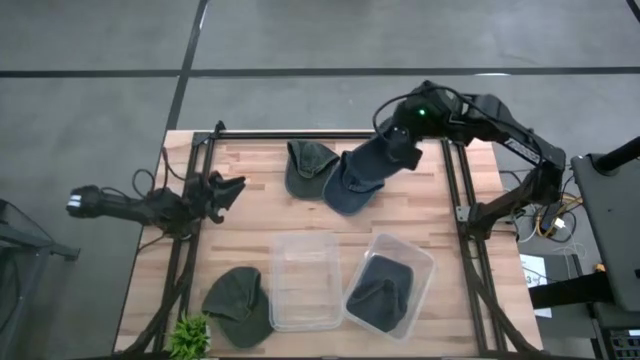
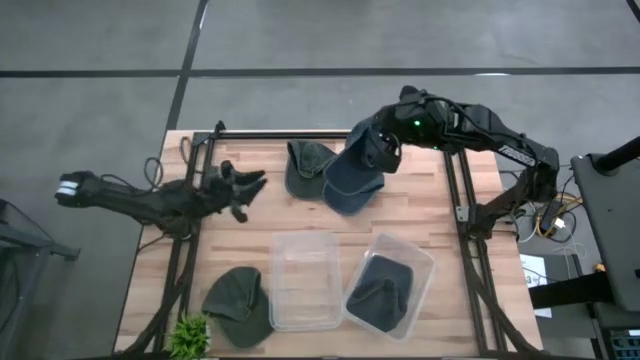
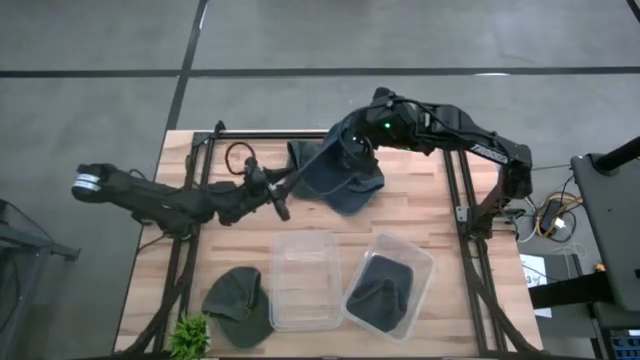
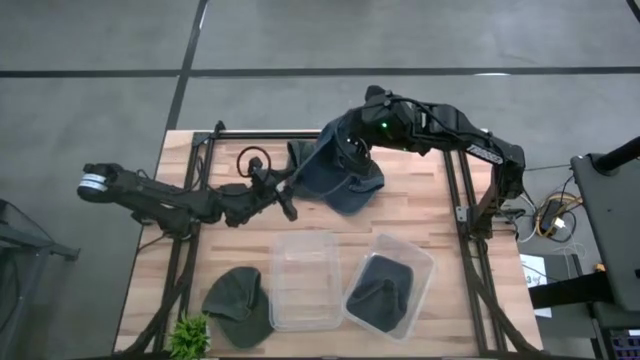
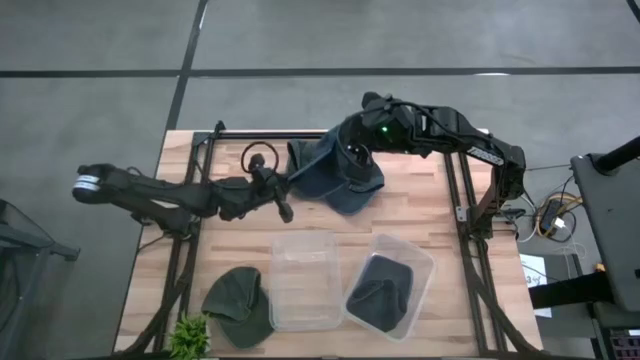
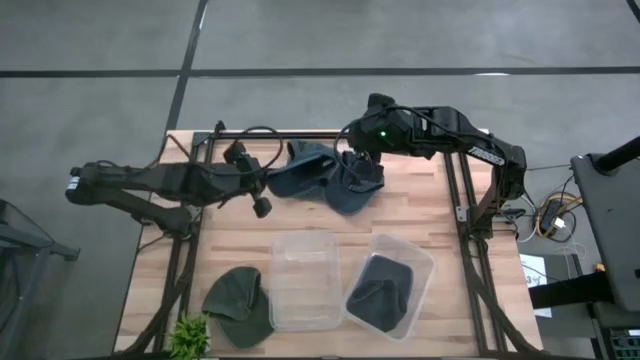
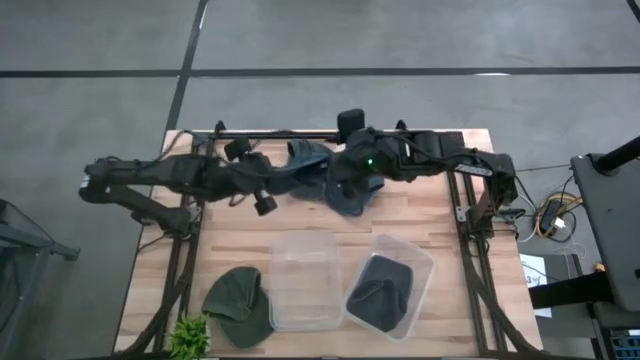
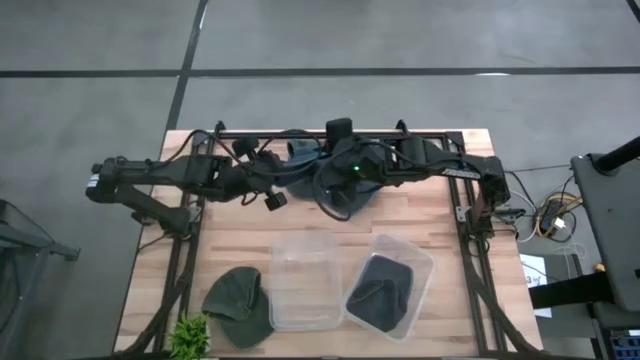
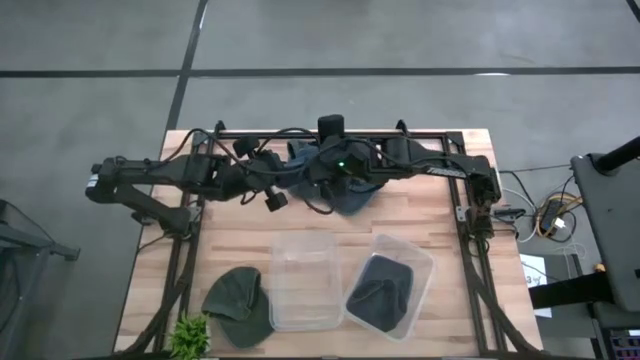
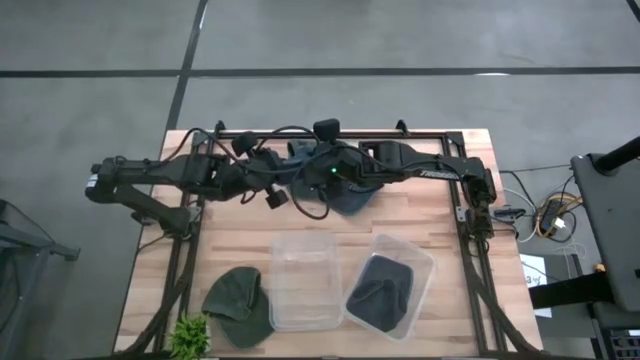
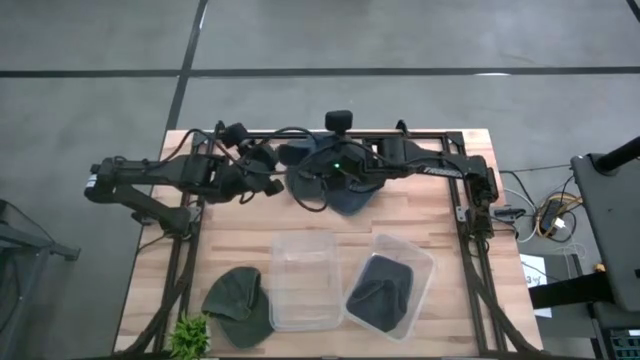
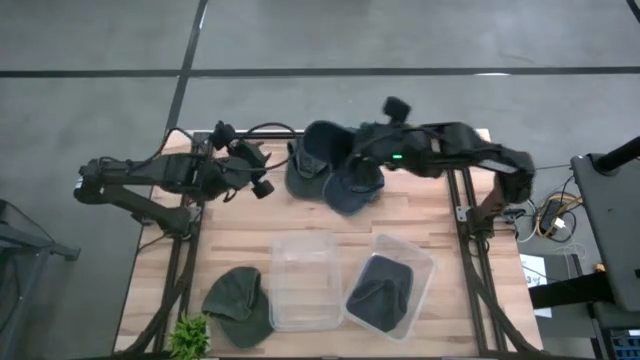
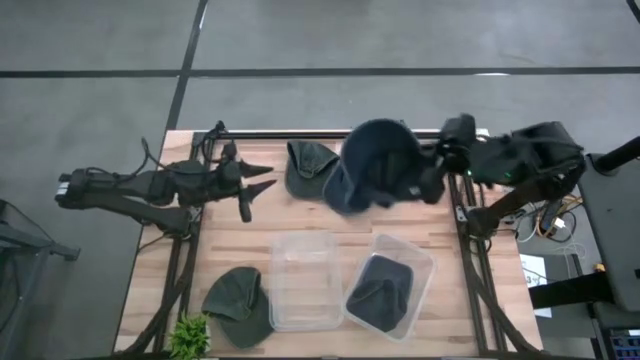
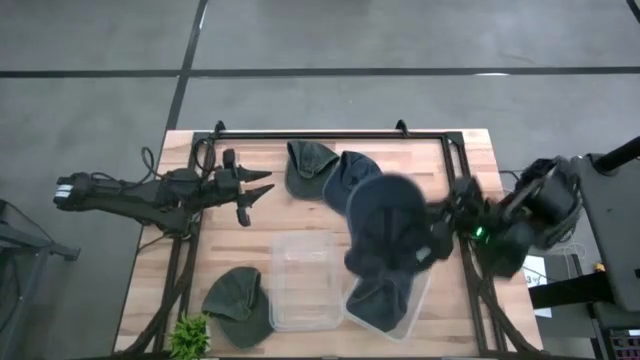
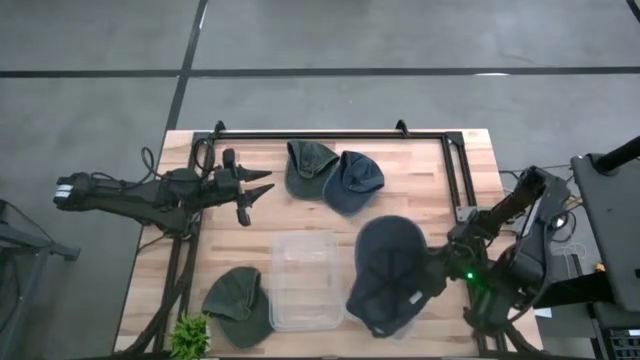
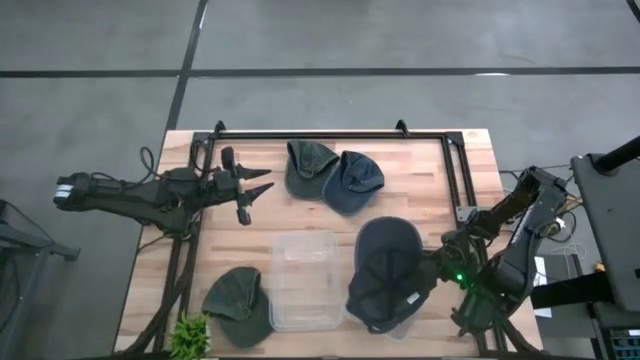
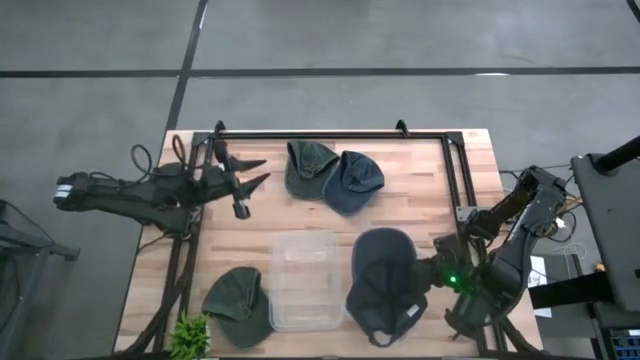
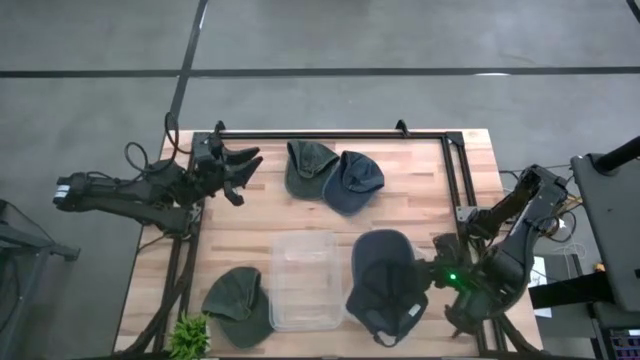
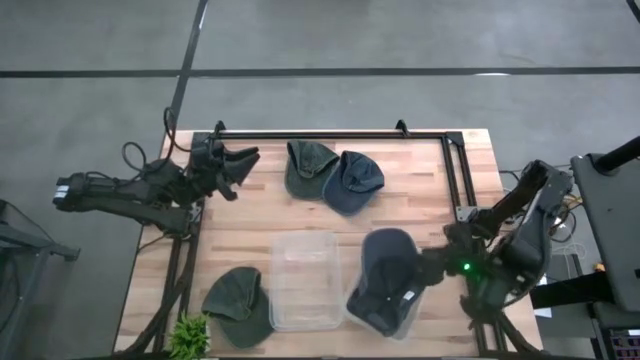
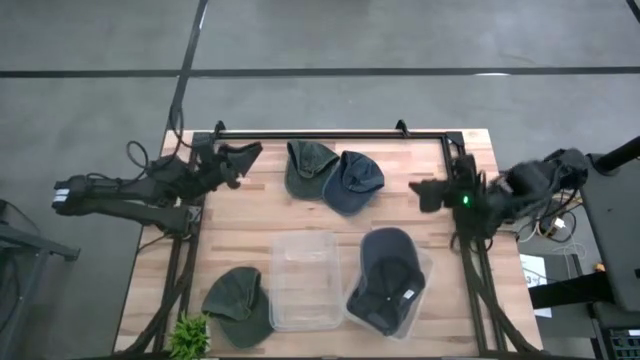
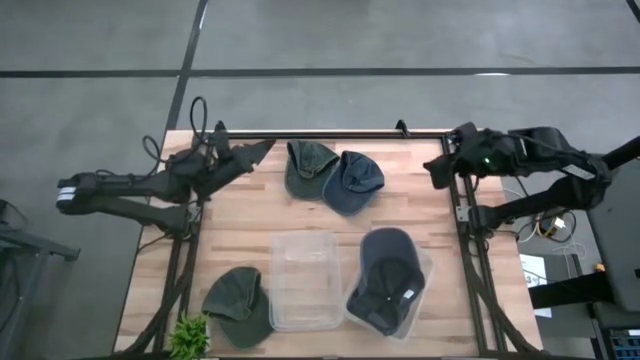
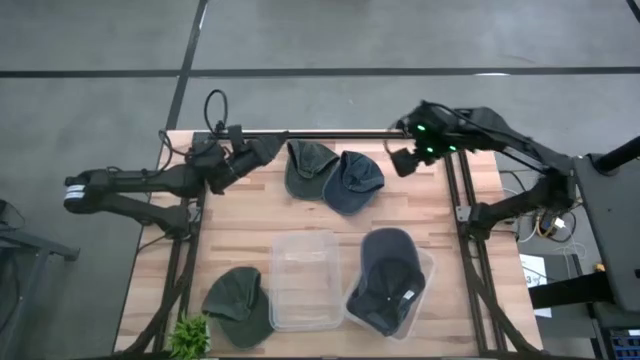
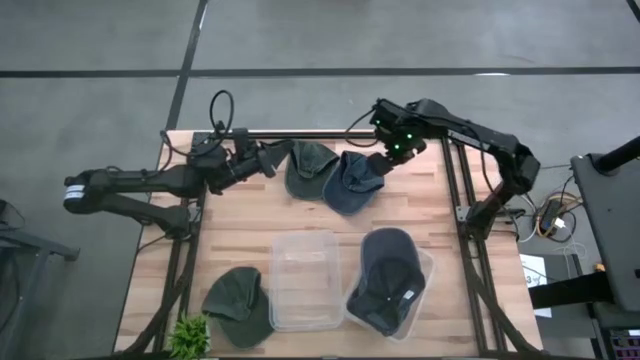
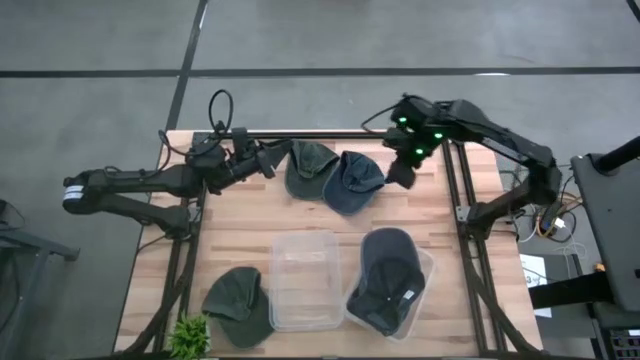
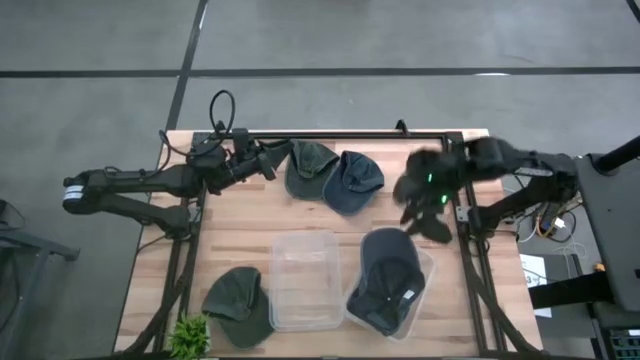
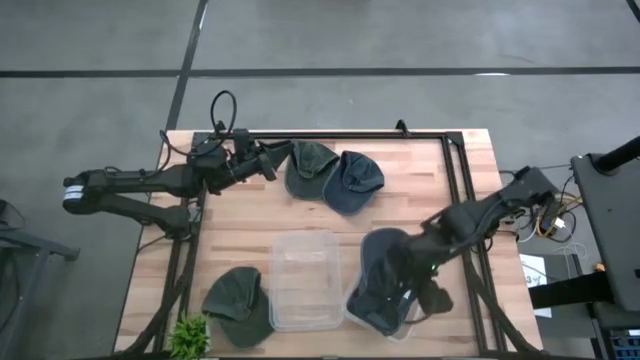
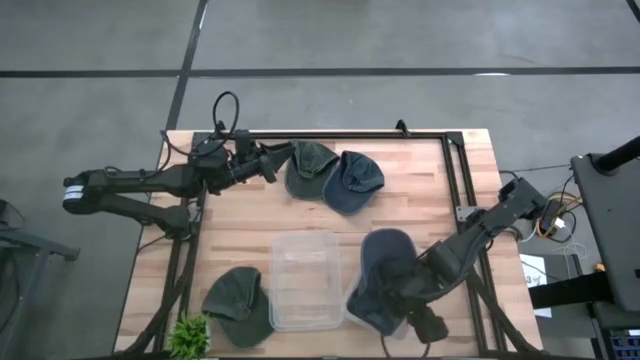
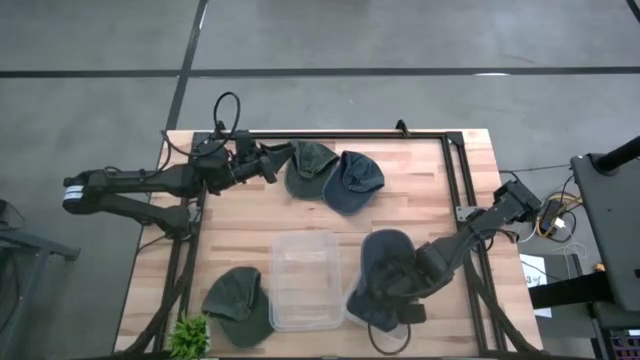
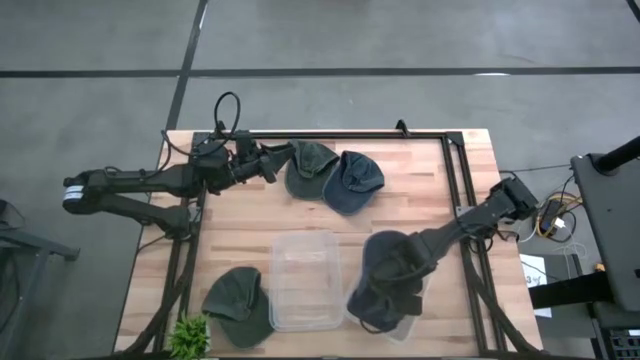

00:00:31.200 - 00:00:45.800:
Task: Pick & Place hat
Put the right blue cap into the right transparent container

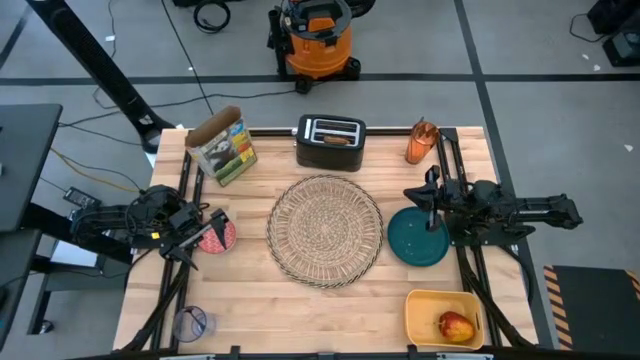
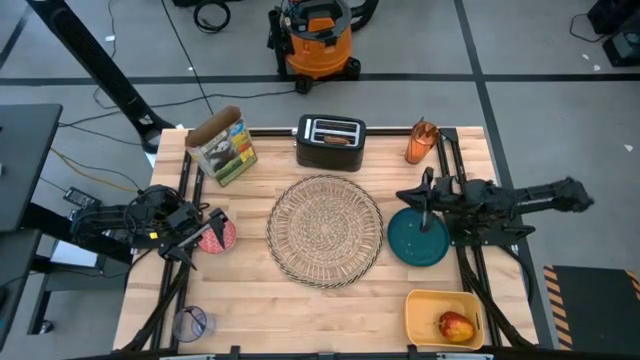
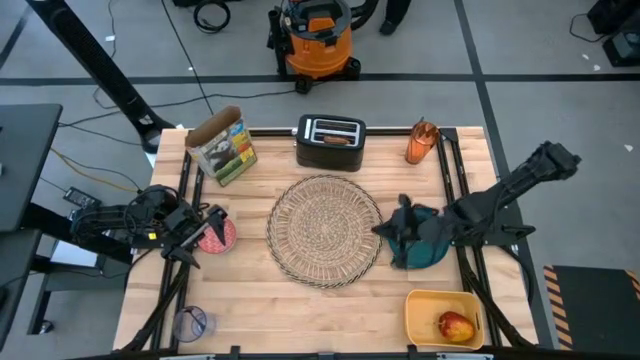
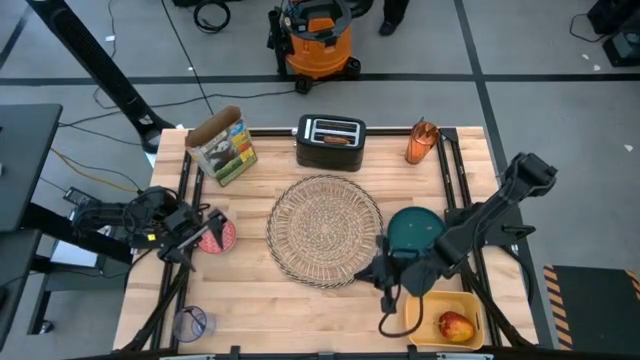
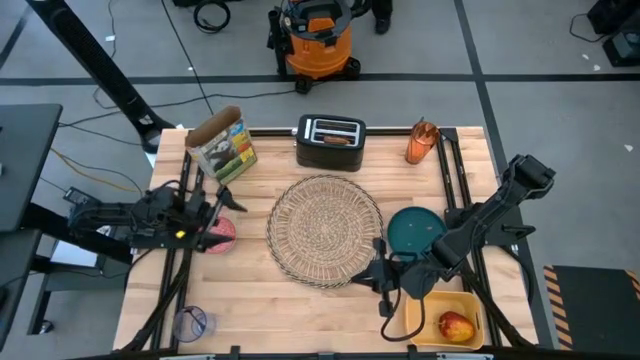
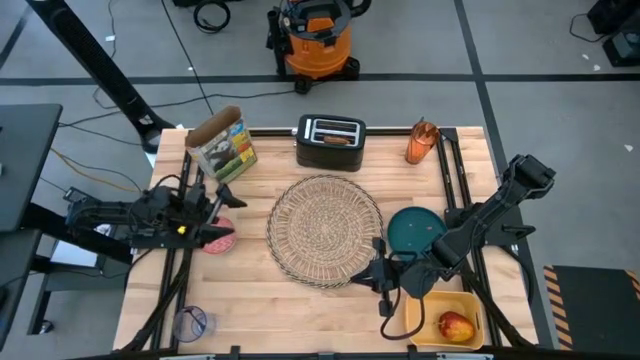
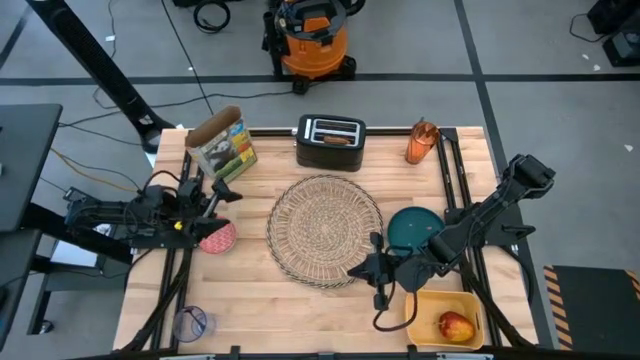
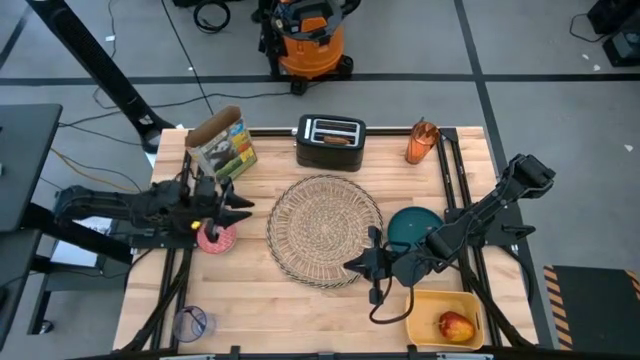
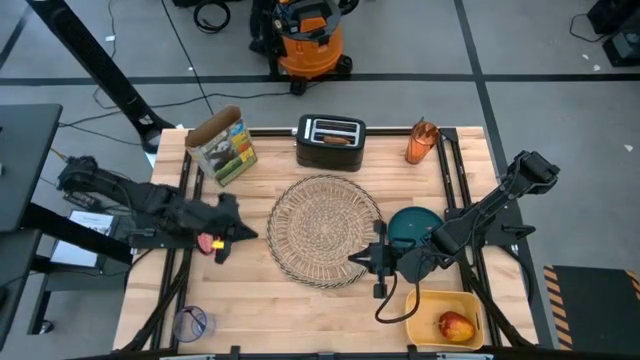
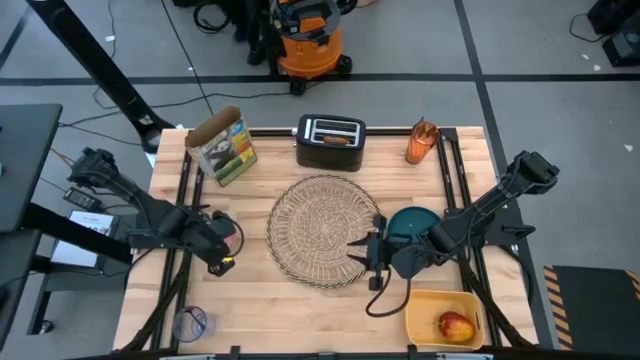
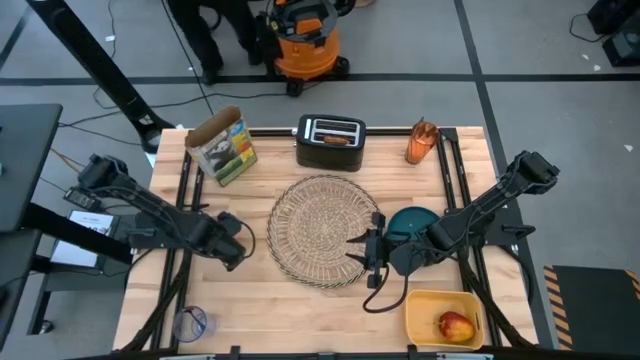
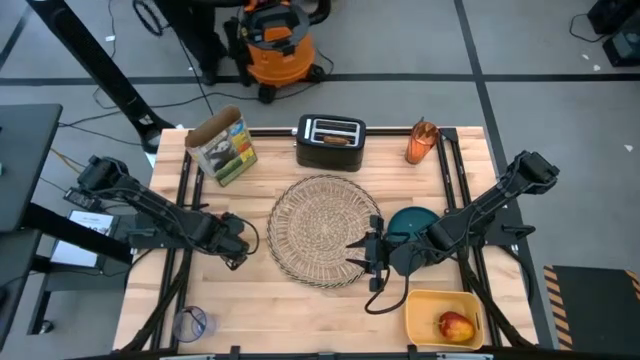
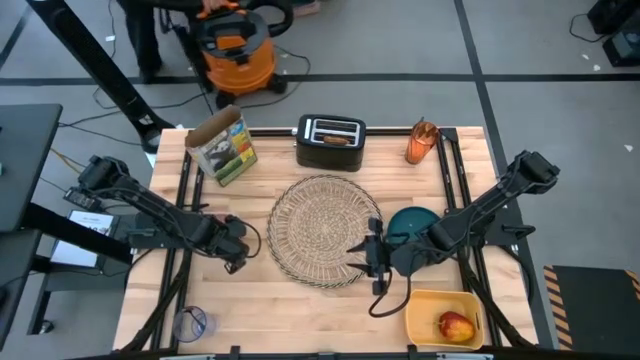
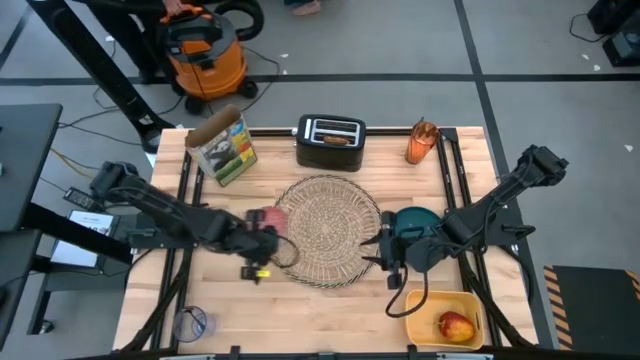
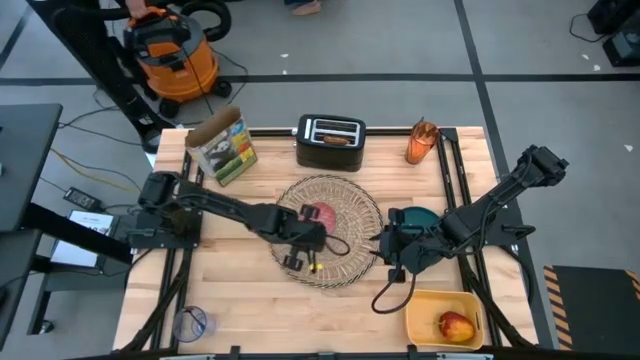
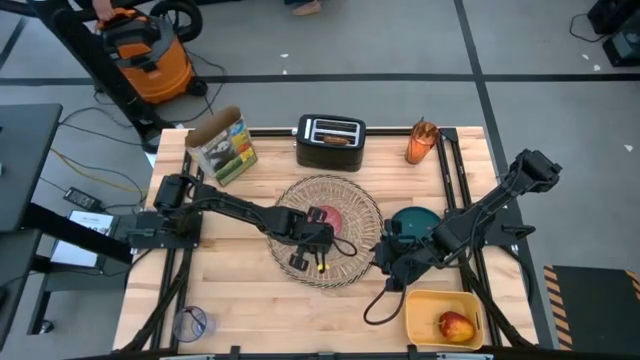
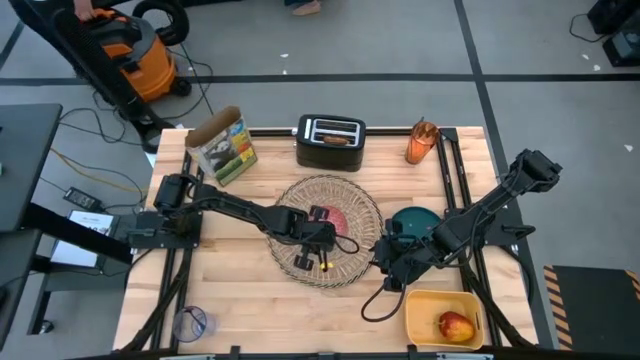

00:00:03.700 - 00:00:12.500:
Task: Arrange a breakfast setting
Put the bowl on the place mat
